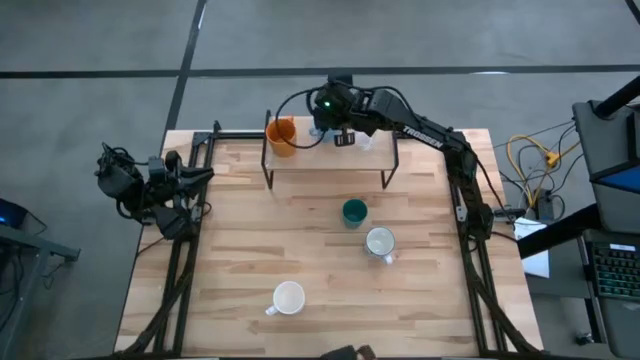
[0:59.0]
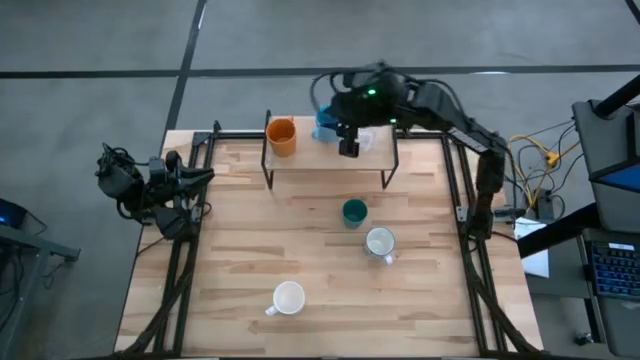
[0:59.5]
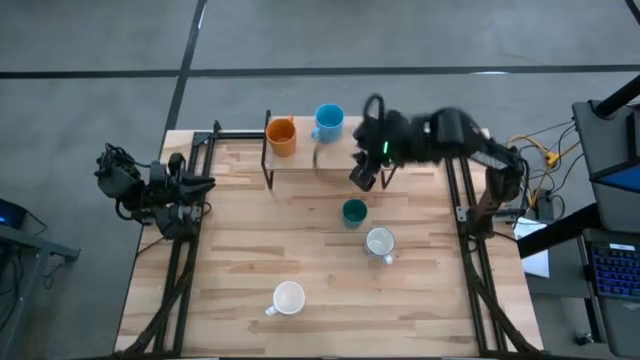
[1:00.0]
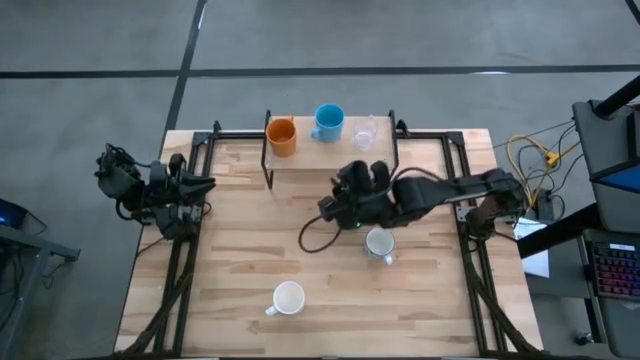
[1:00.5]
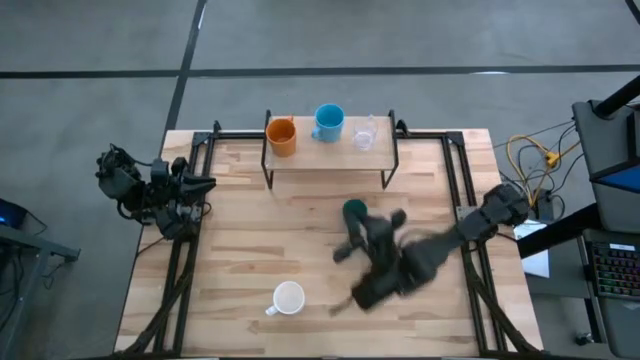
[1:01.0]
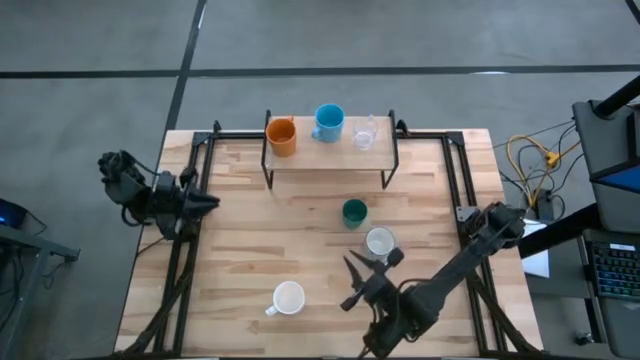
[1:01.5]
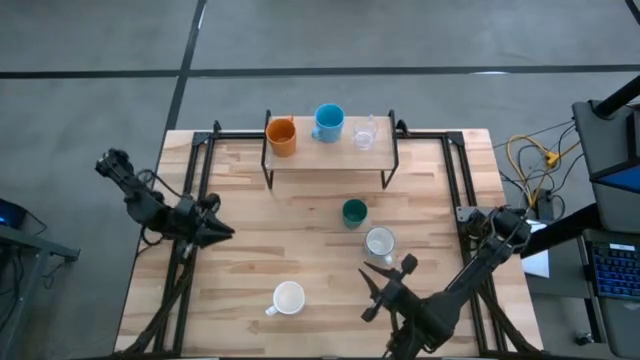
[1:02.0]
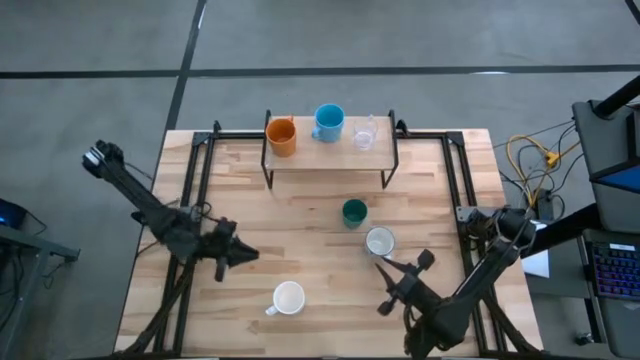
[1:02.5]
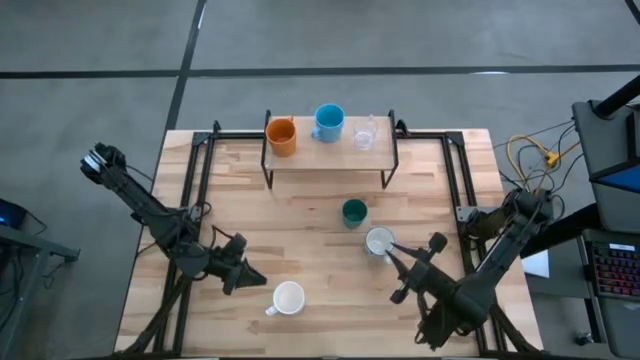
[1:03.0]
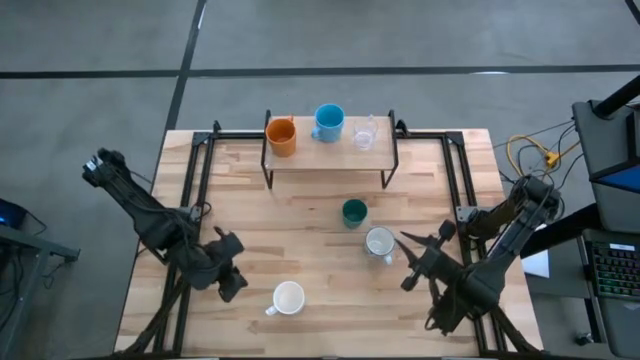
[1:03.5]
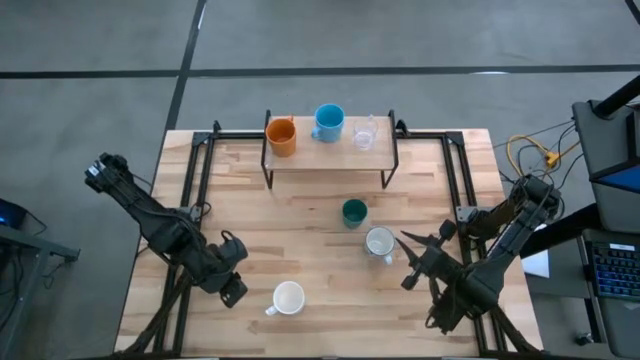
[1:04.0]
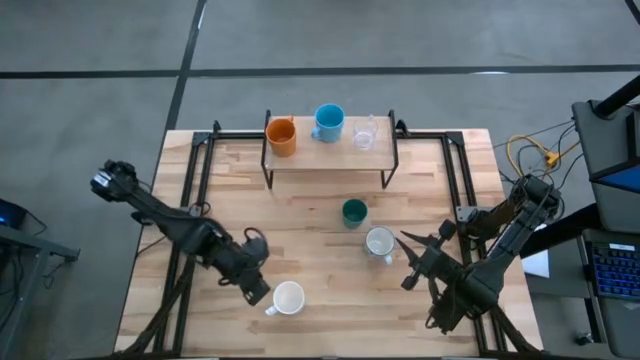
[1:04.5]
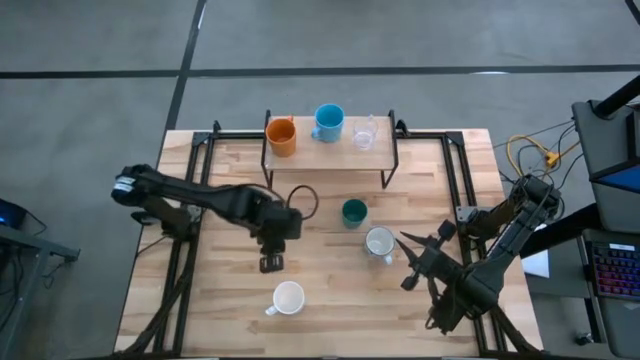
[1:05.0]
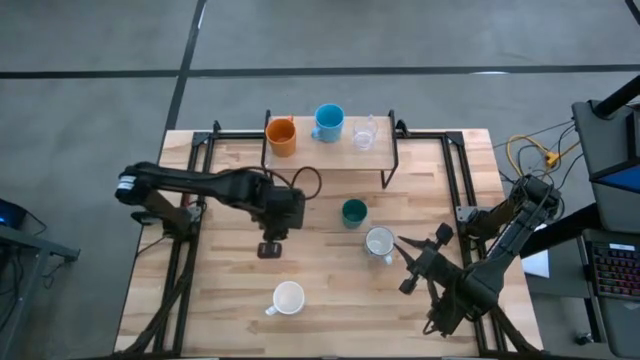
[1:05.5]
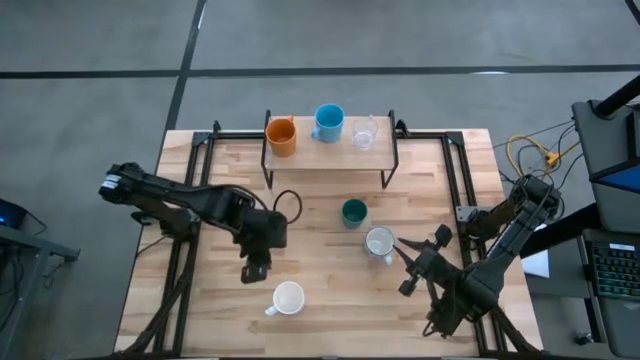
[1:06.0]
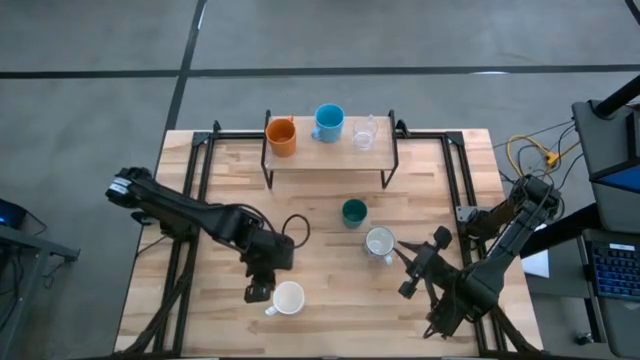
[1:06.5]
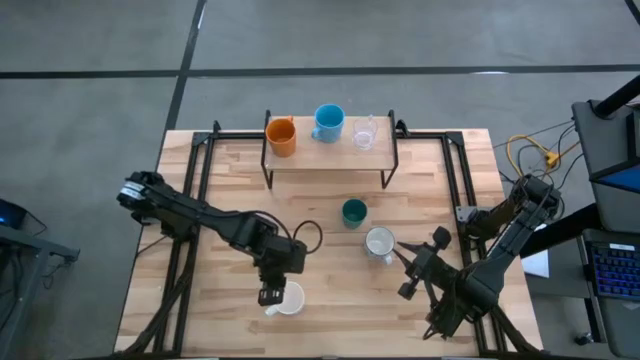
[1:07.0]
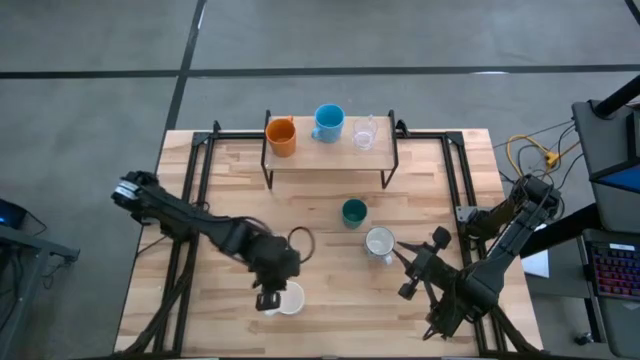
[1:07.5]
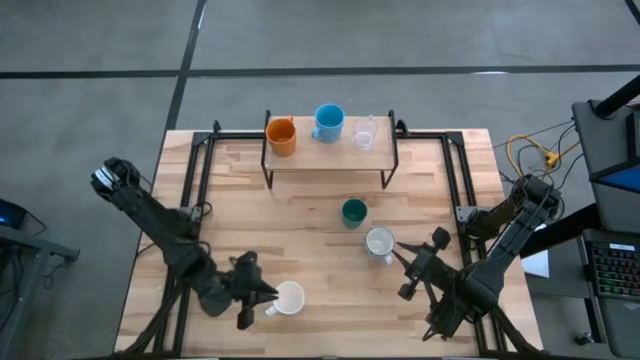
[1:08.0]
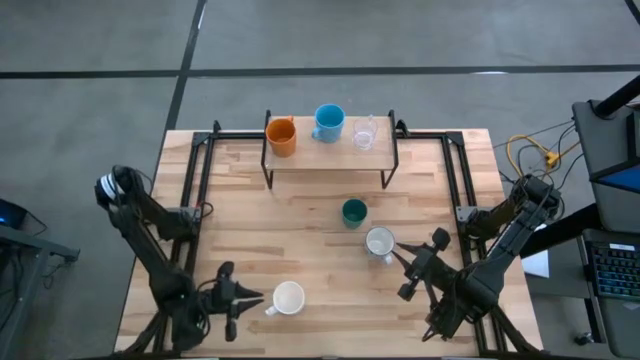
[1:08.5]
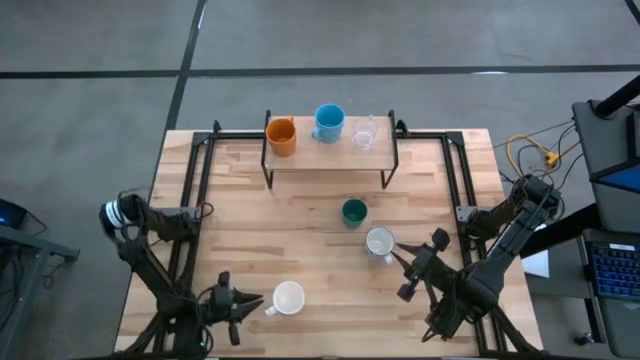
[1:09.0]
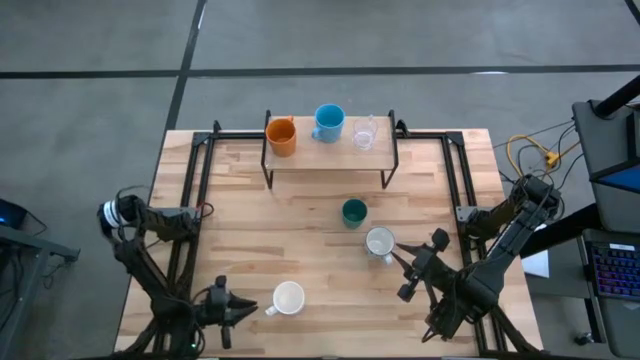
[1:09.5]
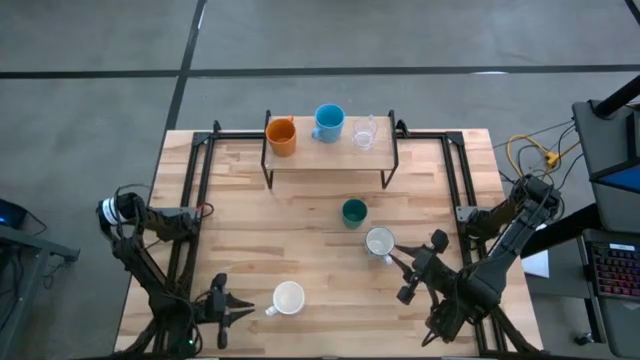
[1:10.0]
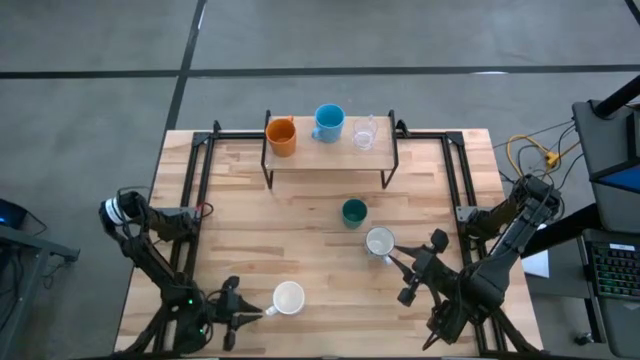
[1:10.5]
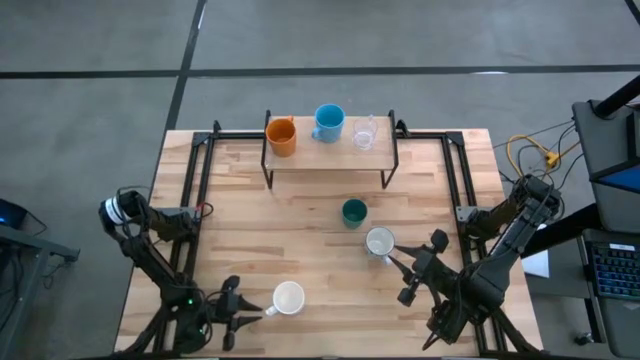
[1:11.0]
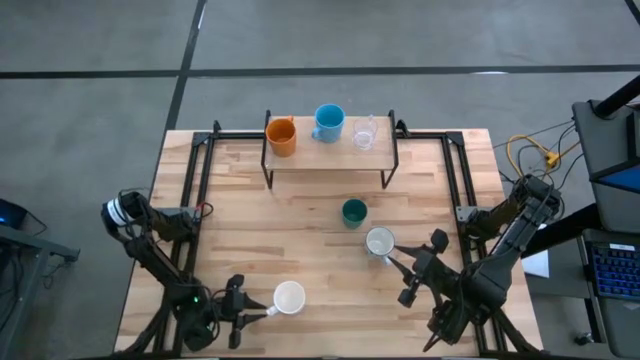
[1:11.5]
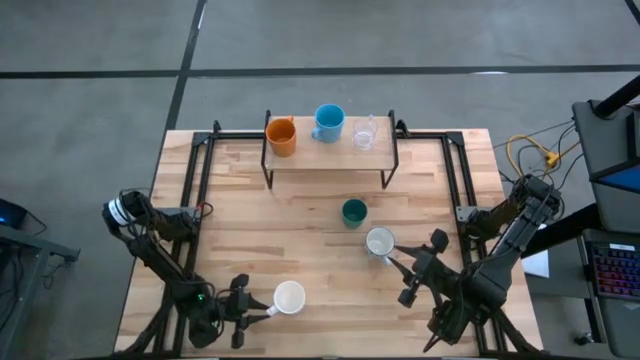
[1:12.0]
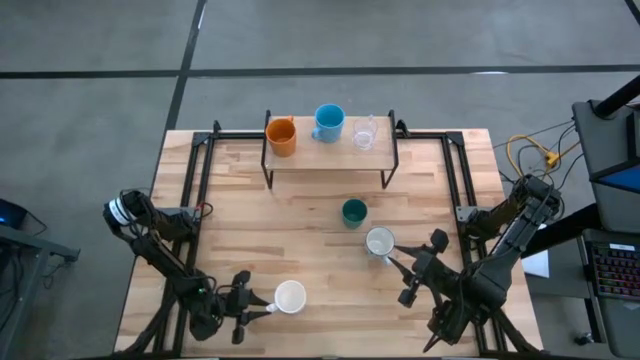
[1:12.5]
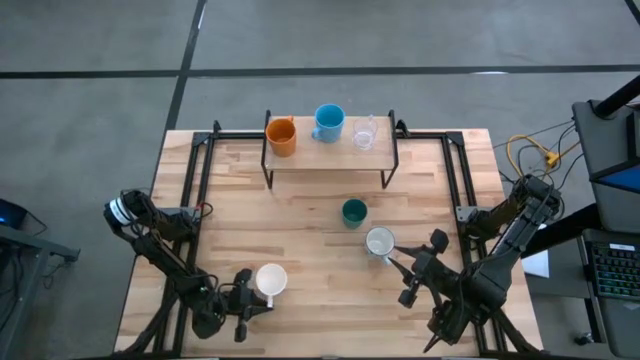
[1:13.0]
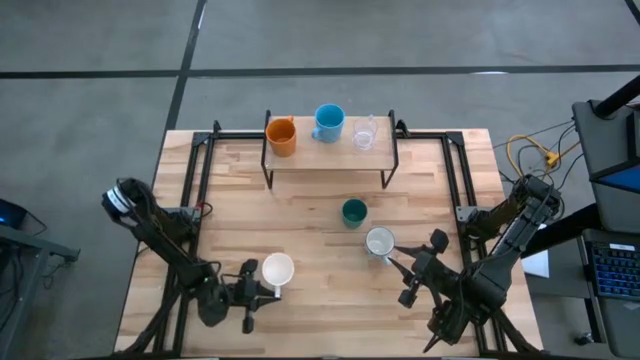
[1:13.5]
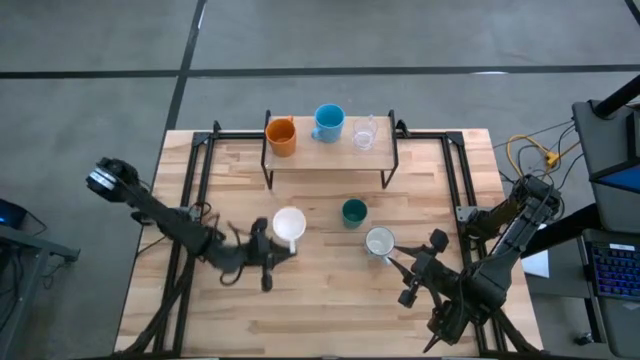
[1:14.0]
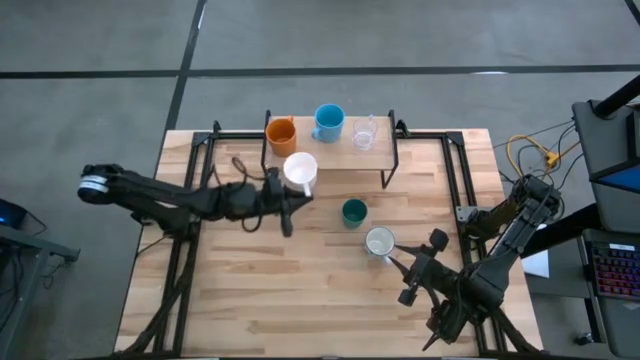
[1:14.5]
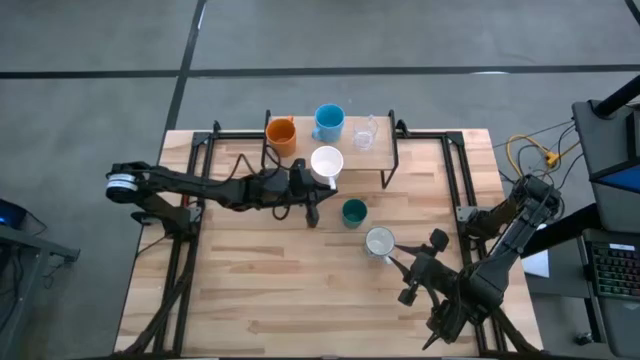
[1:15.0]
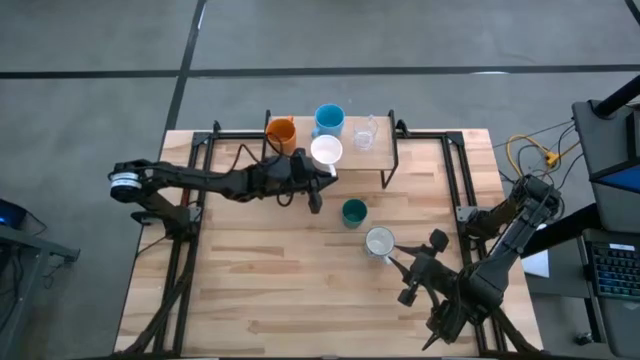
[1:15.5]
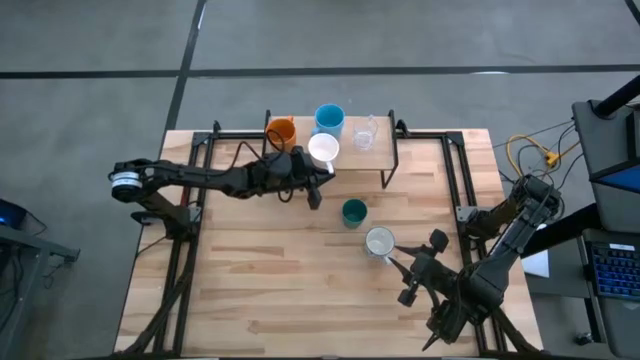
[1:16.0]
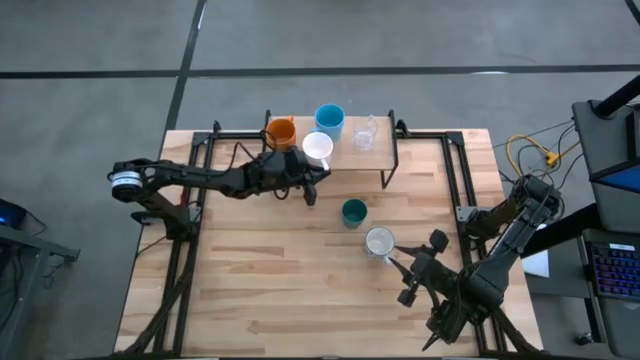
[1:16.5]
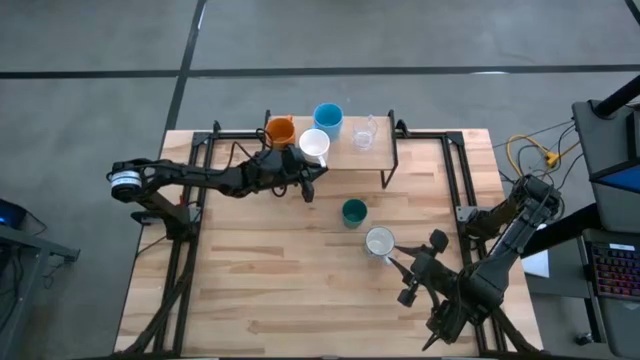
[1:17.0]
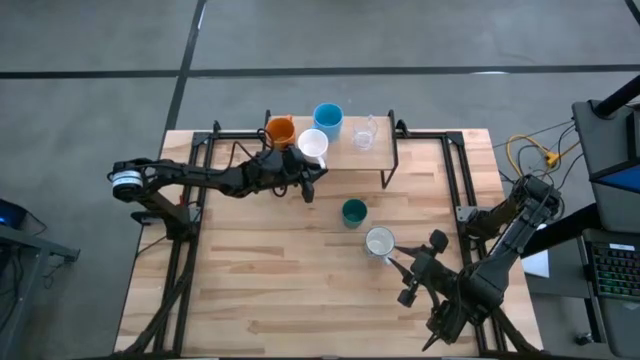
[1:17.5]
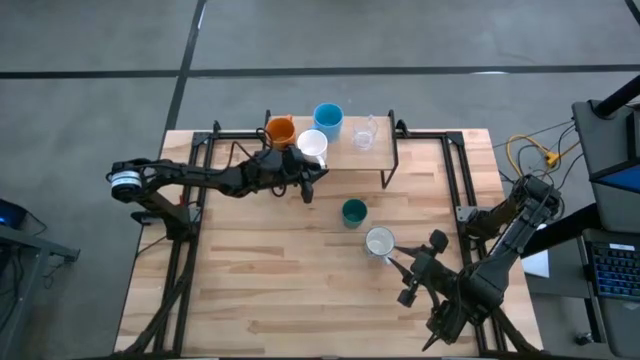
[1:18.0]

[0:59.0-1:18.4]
Task: Stack small to large cups/mugs on shelf
Put the white mug on the shelf
